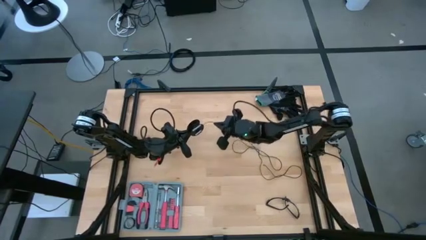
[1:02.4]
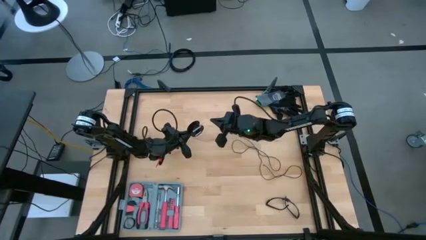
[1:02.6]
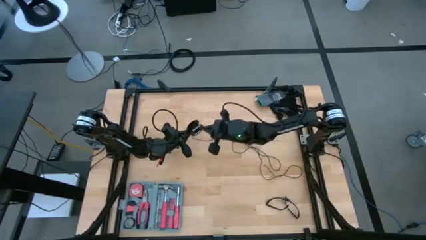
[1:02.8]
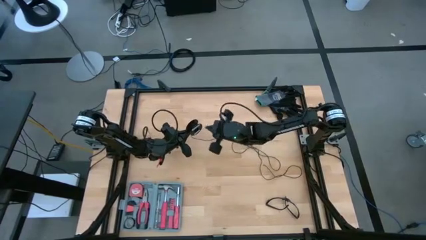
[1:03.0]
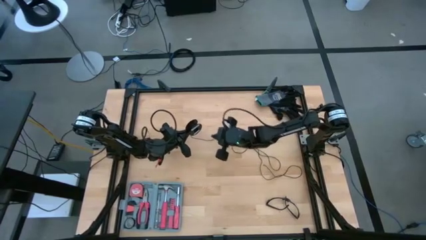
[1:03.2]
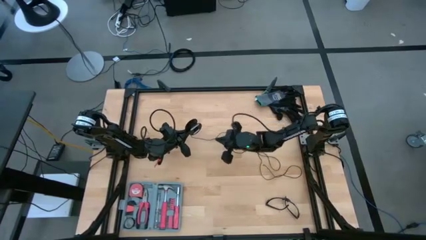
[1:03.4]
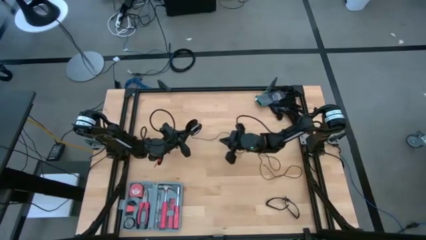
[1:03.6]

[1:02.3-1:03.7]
Task: Coil cords
Coil the black wire onto the spool

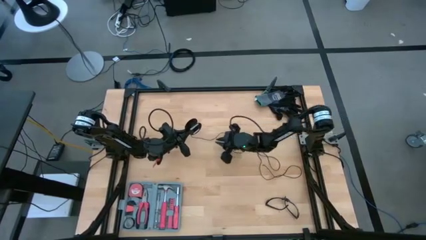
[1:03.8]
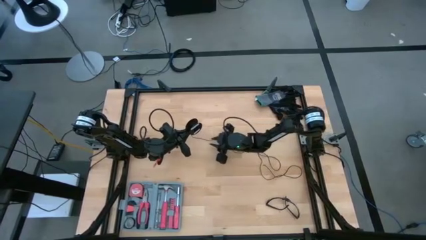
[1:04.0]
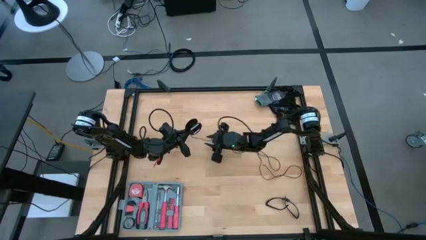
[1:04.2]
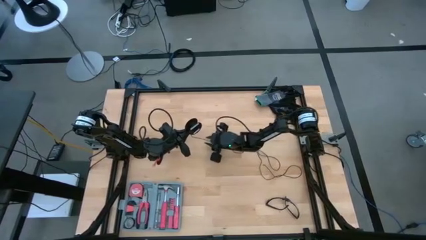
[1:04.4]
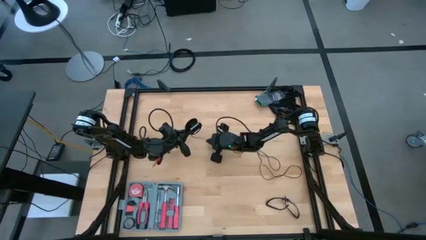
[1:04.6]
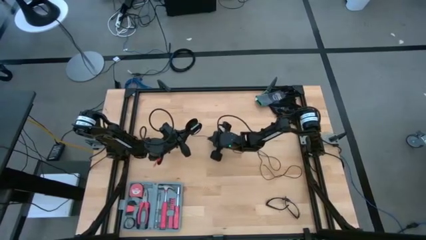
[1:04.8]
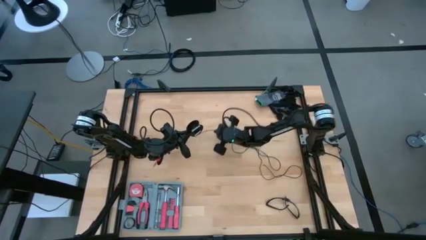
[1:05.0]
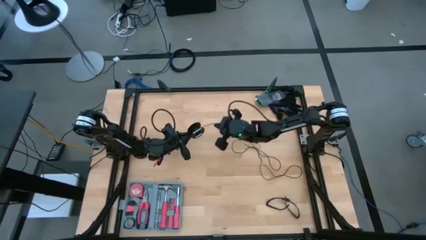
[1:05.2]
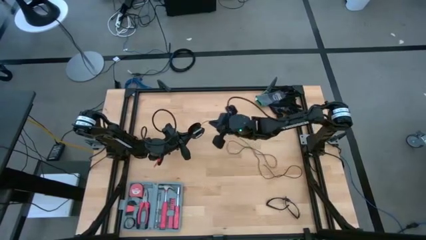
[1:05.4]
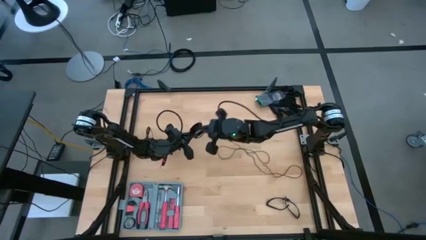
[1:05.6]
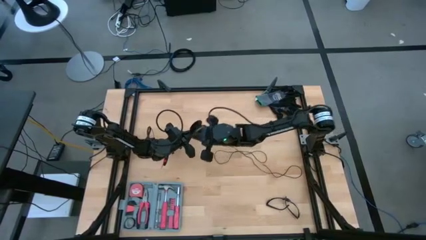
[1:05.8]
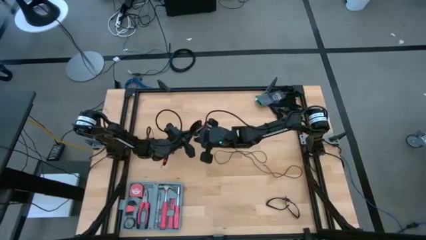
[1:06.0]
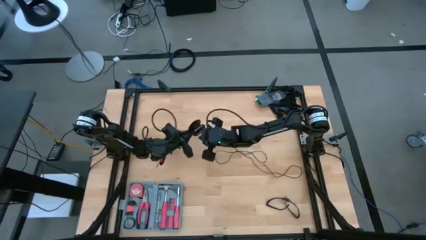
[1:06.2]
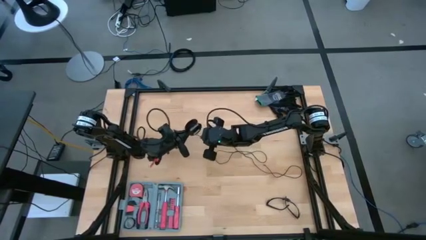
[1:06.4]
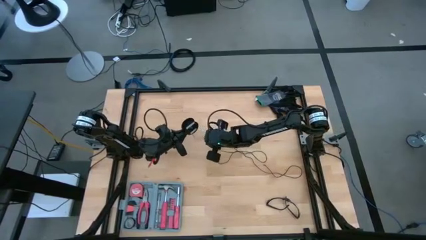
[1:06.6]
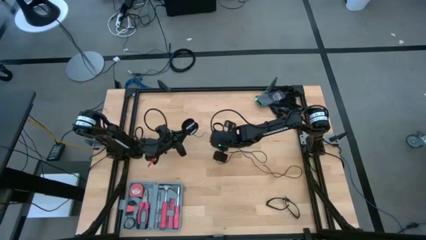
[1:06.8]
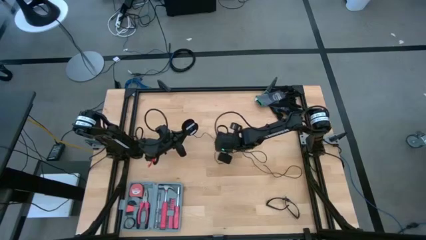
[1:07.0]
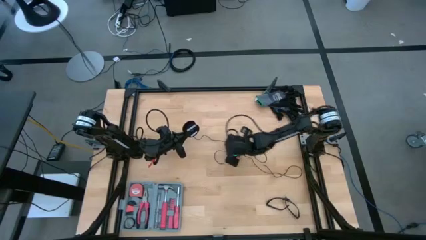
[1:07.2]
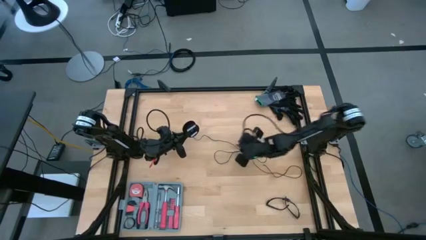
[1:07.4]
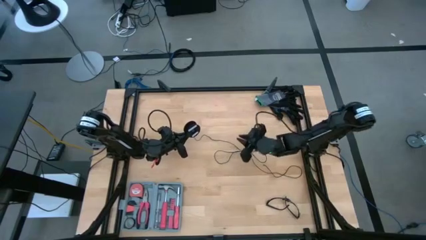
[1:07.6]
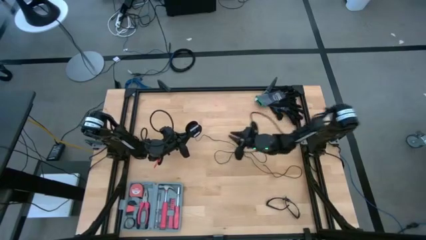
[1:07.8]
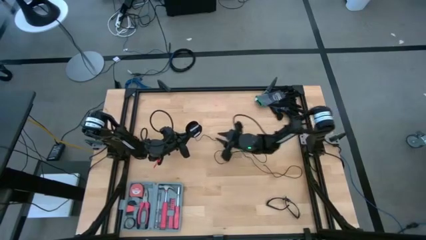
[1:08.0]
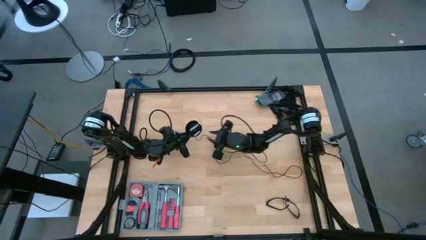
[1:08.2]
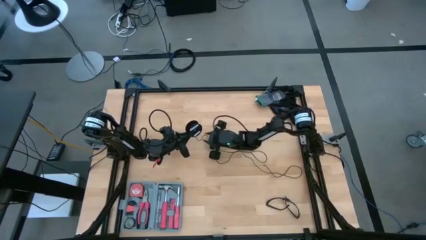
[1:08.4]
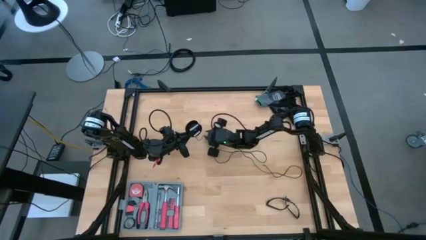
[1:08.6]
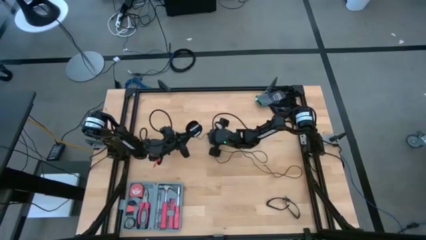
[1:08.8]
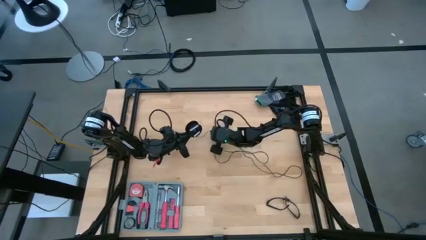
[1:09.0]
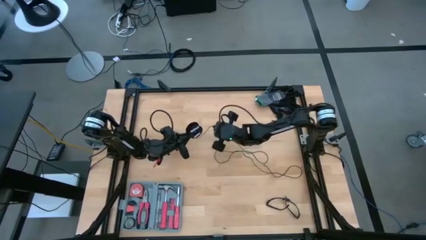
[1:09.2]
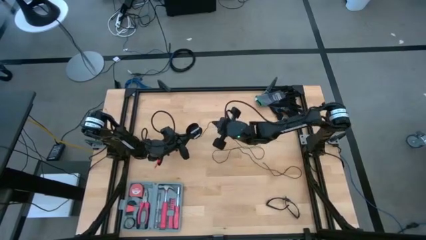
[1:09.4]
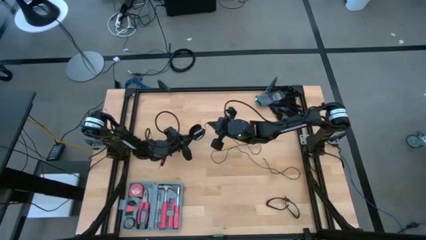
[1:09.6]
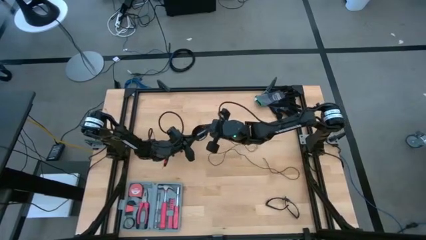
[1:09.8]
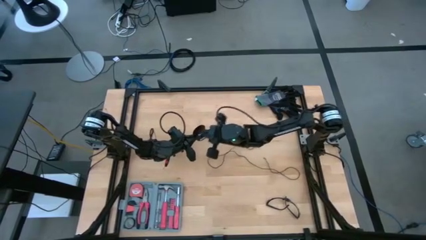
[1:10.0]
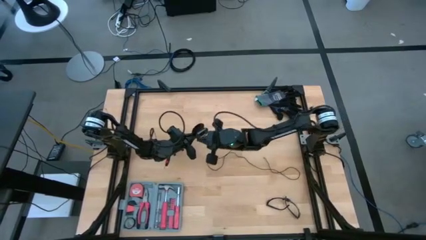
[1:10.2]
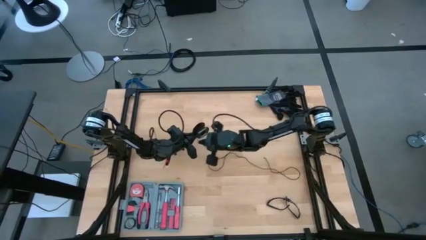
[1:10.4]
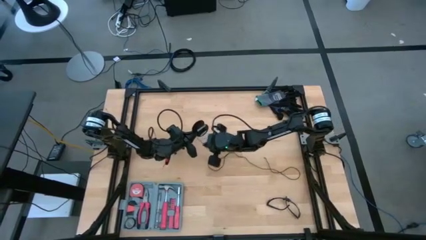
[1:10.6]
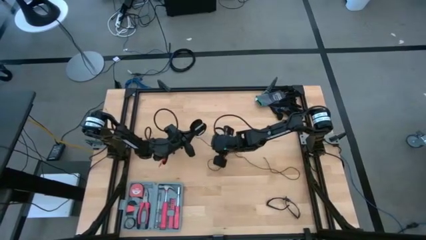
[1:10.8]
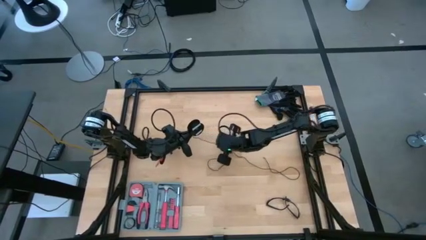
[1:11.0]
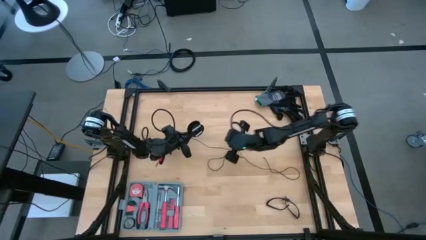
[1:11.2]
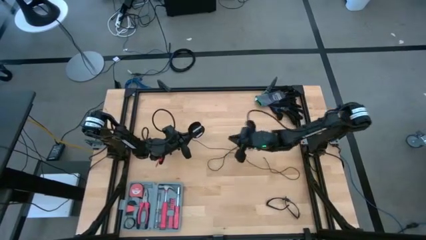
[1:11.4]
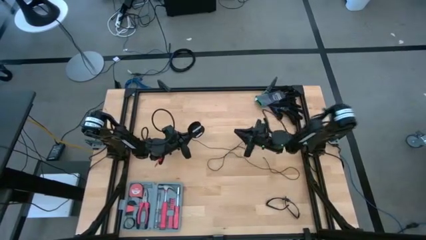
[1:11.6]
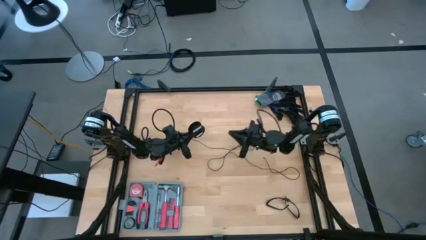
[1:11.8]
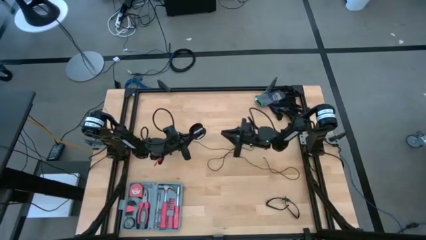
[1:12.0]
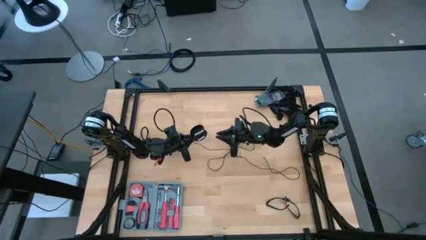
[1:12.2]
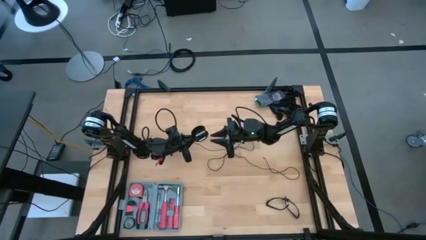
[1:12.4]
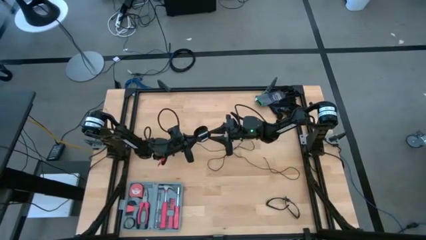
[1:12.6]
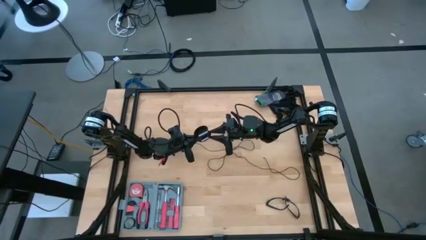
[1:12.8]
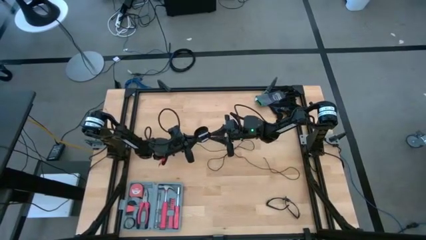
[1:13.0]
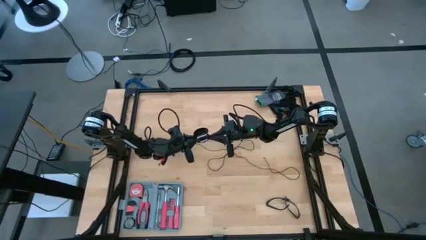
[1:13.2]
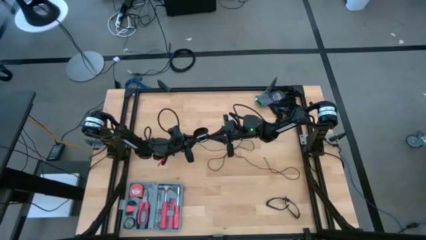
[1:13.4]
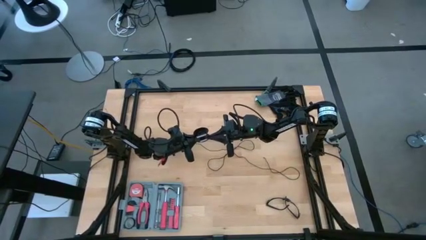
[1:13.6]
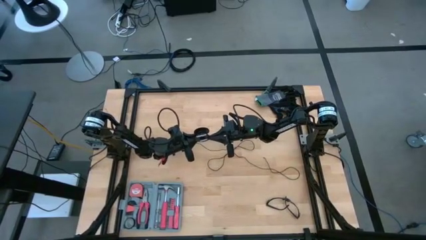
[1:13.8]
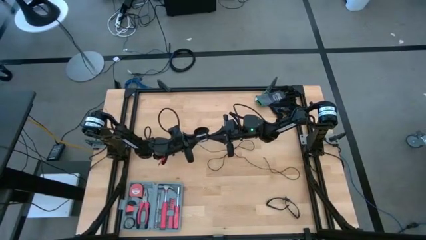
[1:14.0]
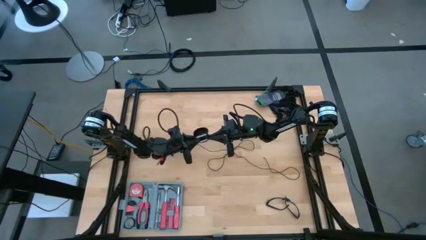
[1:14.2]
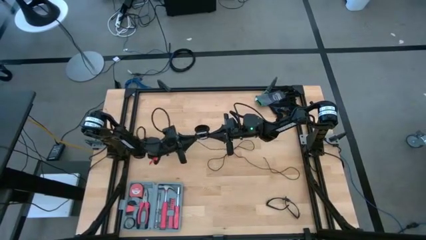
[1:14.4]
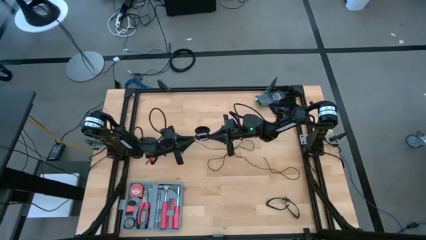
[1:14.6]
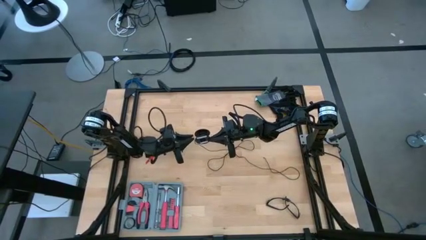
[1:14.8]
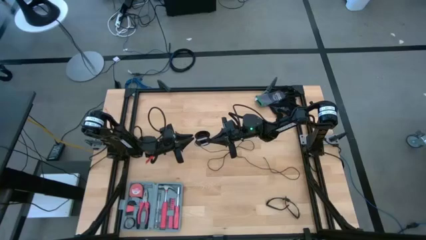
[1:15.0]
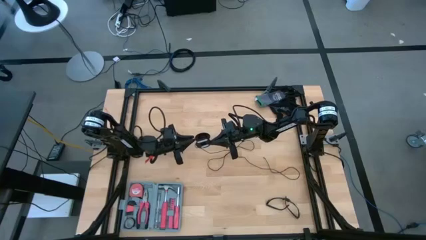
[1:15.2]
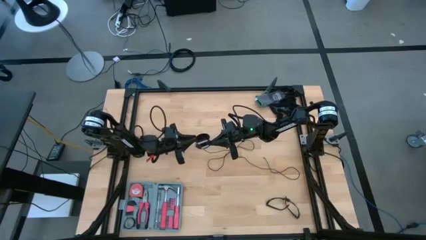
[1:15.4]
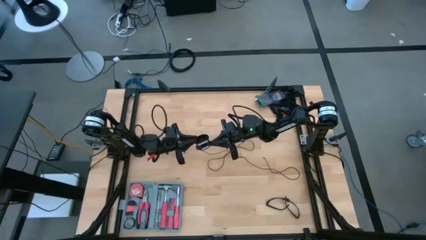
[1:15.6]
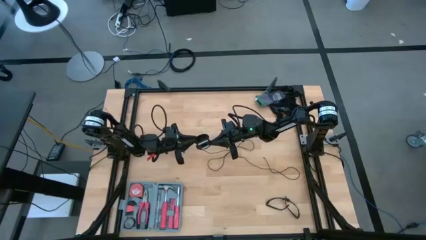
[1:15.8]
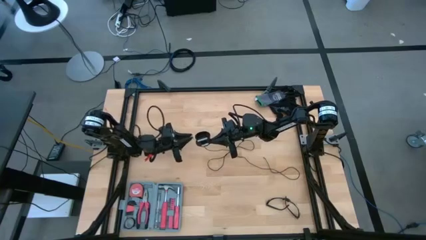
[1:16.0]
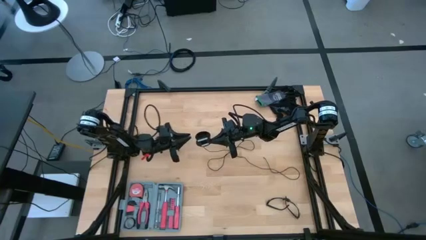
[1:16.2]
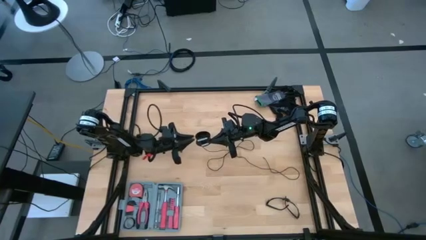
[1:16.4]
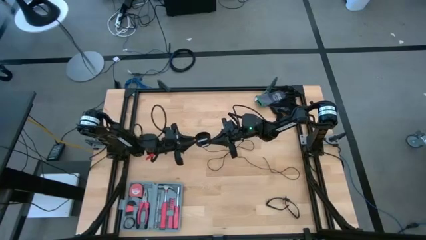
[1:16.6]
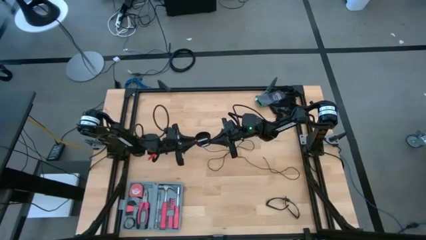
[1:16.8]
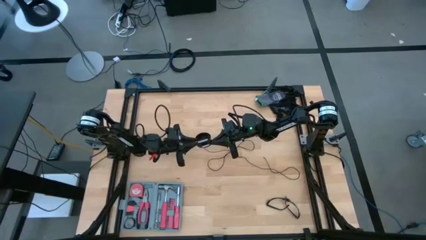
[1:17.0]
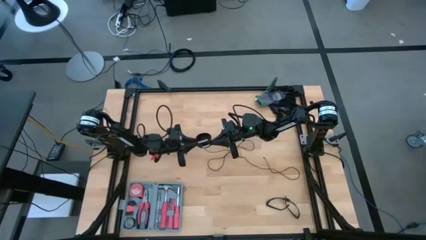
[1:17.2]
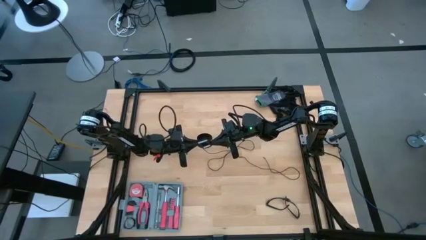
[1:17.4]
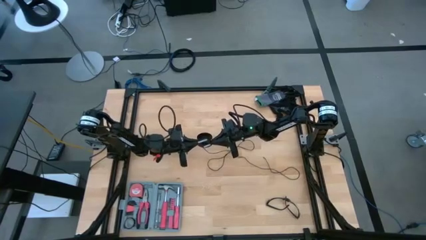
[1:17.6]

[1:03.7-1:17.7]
Coil the black wire onto the spool

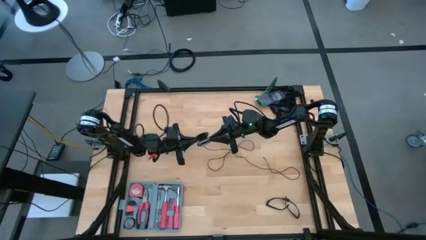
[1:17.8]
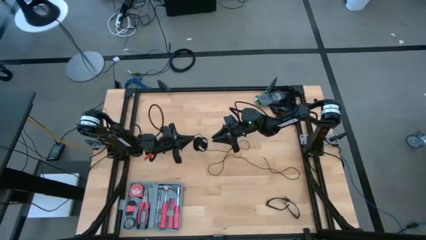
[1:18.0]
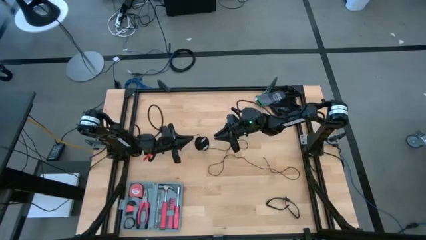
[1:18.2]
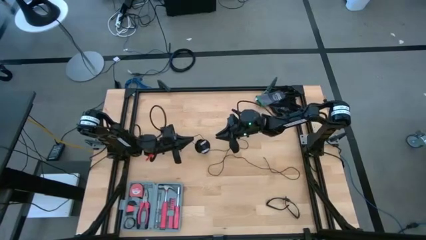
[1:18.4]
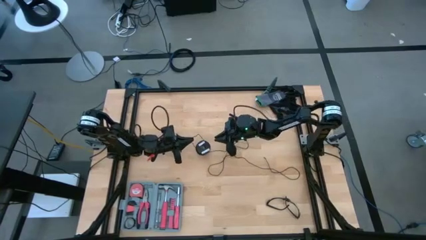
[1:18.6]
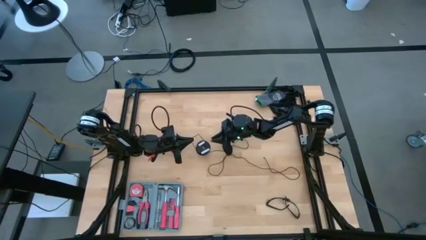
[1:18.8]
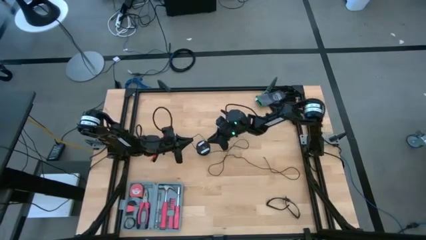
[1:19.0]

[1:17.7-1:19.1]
Coil the black wire onto the spool
